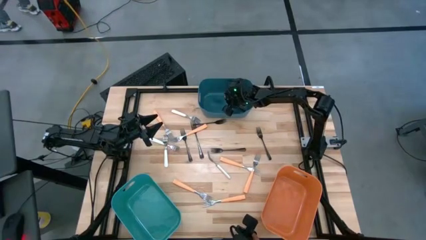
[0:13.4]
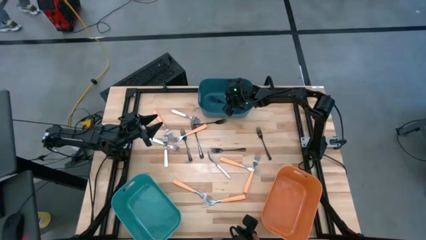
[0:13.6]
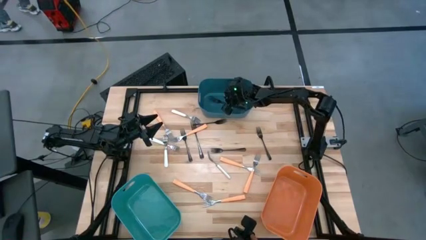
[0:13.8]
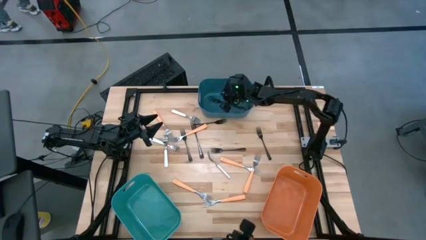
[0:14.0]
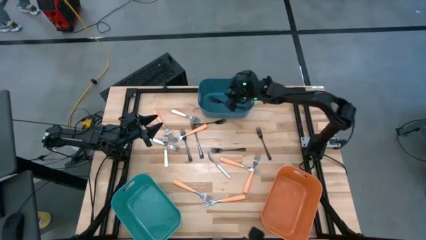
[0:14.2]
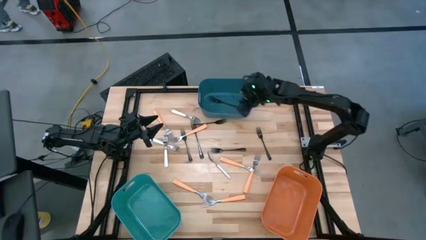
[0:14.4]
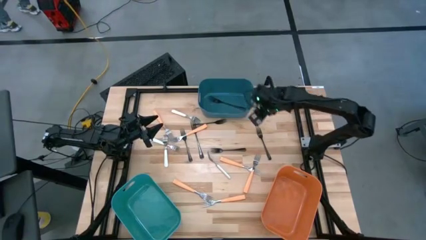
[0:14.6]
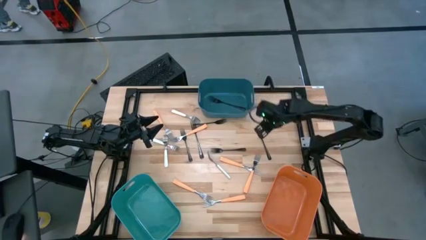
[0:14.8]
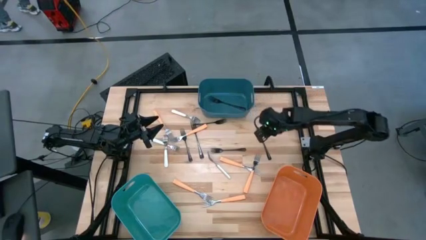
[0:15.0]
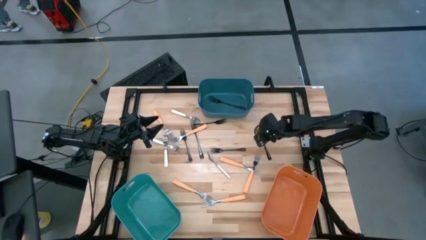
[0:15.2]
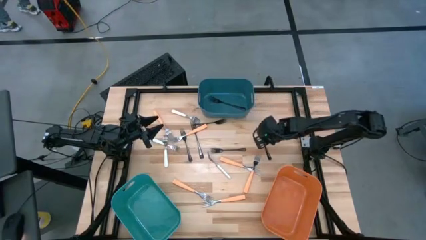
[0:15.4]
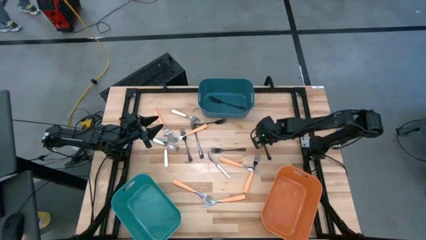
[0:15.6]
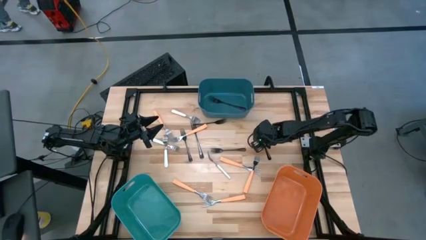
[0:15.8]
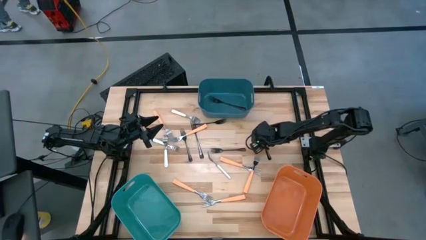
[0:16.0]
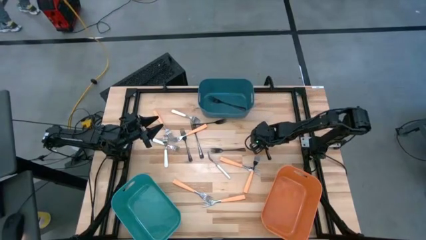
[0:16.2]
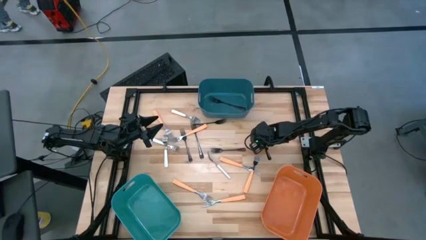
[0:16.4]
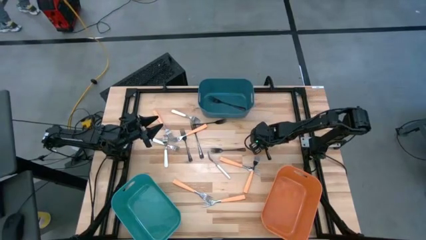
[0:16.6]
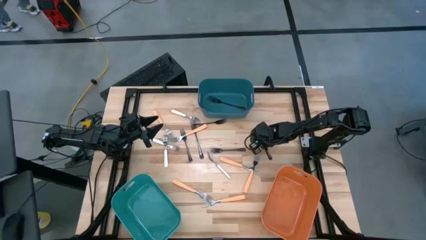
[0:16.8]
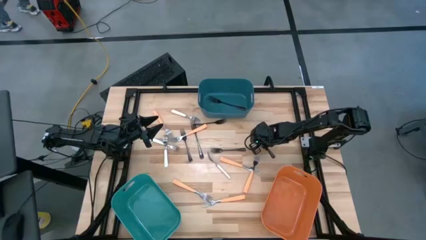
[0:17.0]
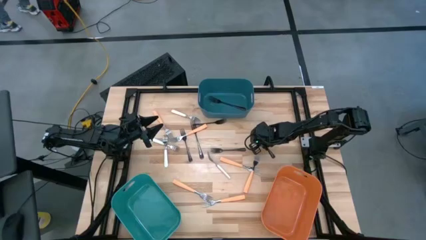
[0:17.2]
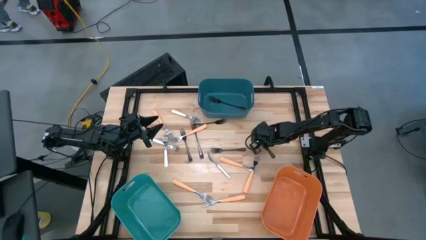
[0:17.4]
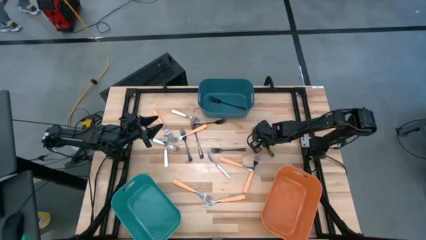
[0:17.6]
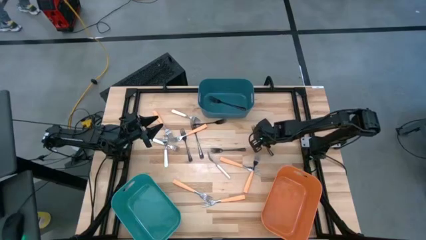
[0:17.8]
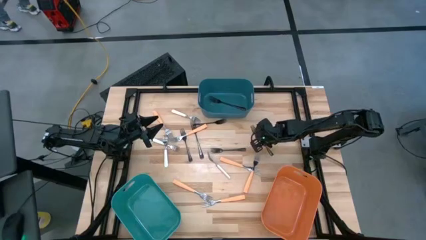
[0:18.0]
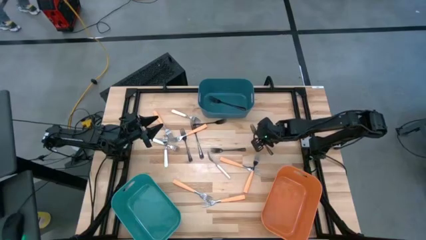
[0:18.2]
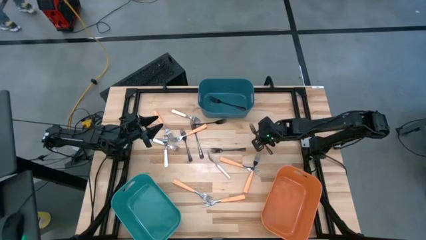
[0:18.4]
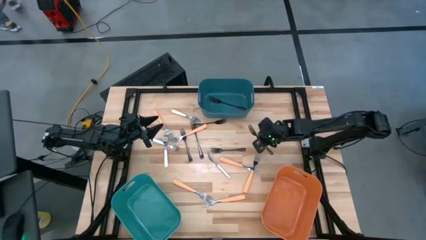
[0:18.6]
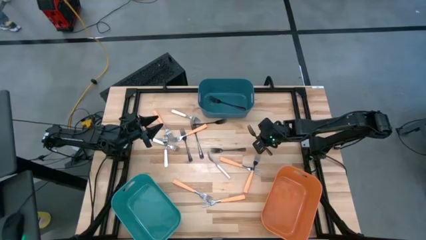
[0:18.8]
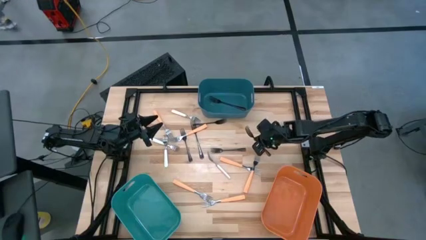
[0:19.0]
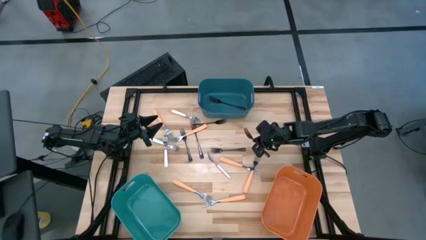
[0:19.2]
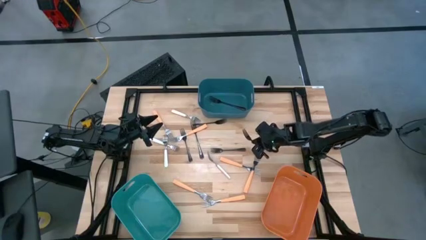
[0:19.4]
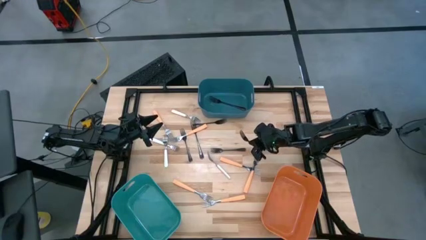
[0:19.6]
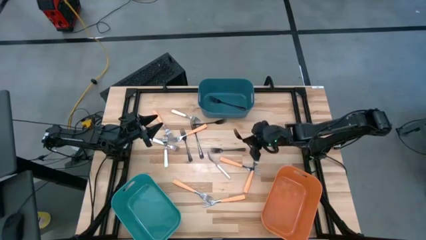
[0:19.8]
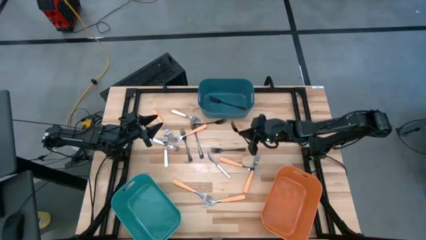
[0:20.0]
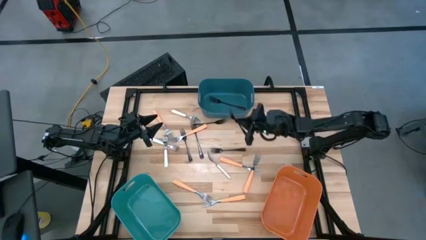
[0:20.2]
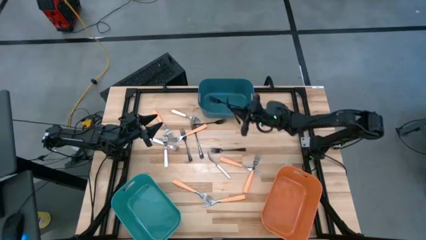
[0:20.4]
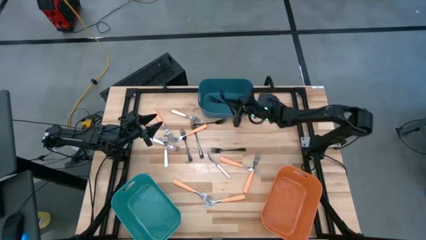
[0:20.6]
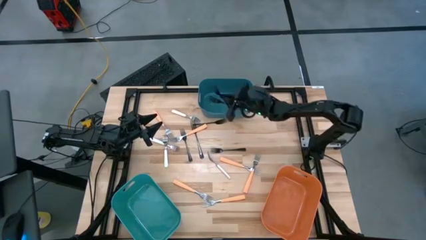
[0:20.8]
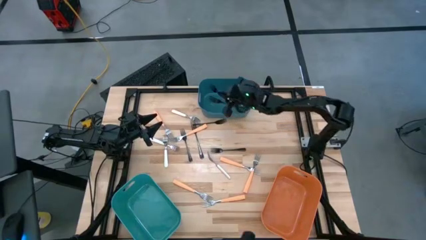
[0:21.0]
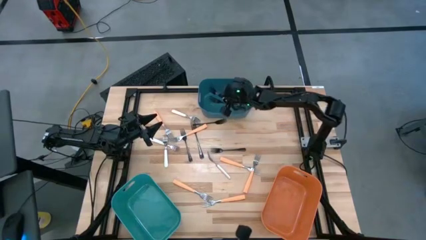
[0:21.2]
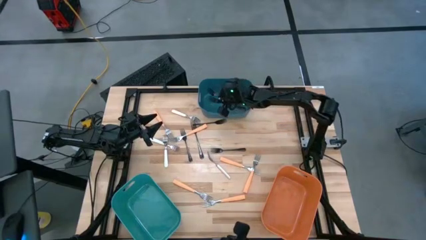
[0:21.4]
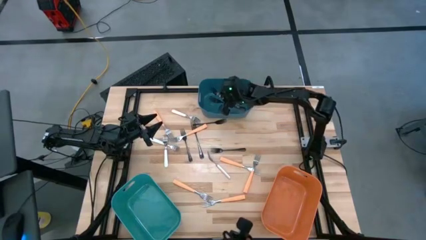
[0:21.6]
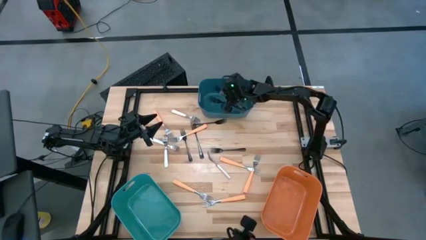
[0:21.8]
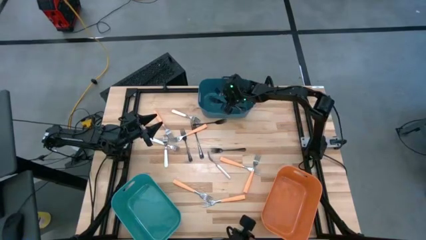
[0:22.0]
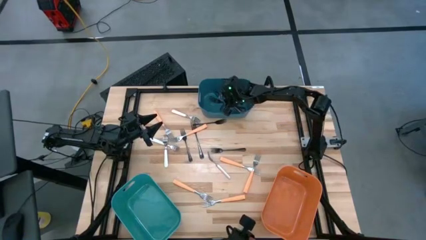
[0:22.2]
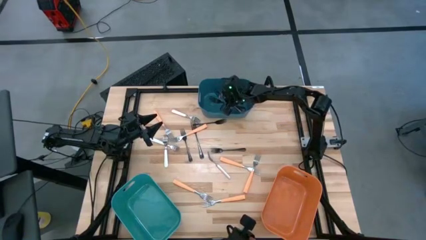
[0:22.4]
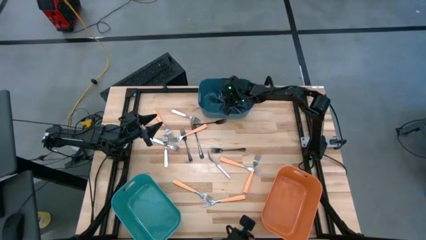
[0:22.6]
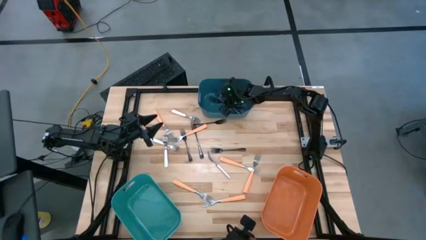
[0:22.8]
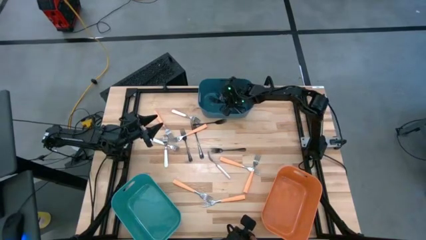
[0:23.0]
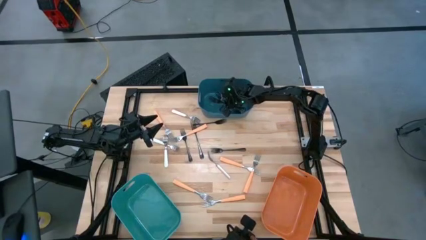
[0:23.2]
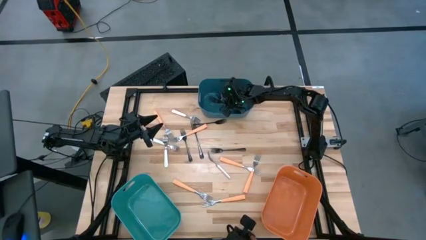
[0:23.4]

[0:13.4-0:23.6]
Task: Sort silverware by color (type)
Put the black fork into the blue bin
